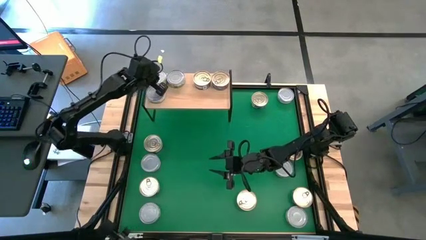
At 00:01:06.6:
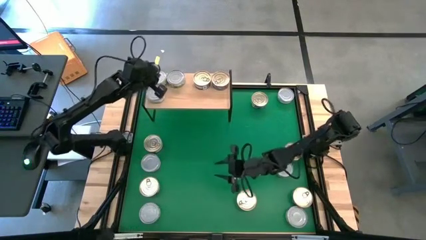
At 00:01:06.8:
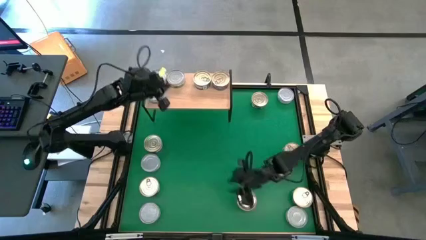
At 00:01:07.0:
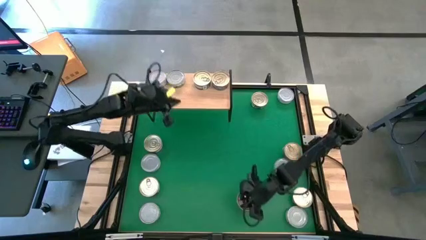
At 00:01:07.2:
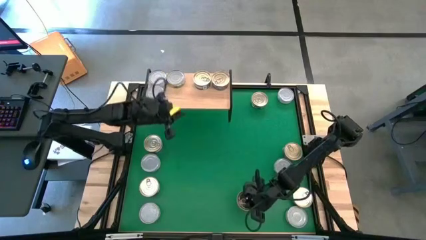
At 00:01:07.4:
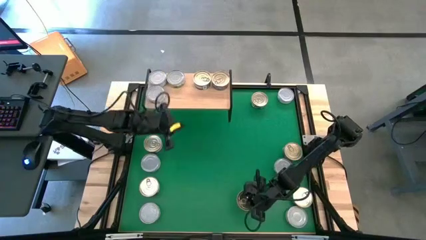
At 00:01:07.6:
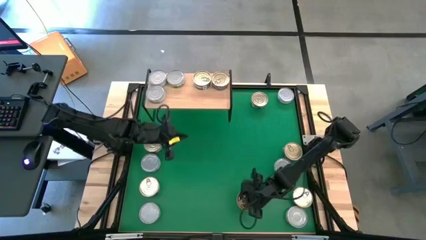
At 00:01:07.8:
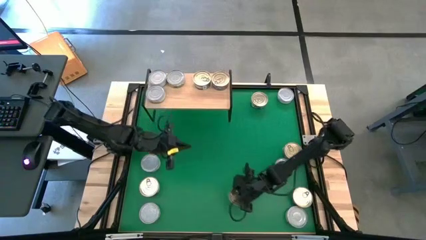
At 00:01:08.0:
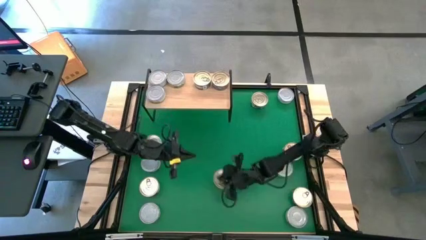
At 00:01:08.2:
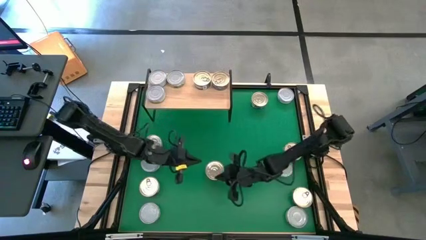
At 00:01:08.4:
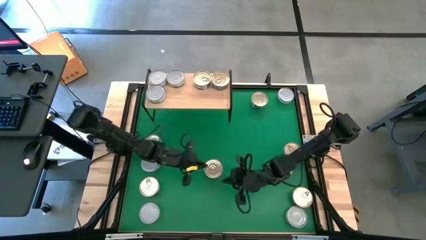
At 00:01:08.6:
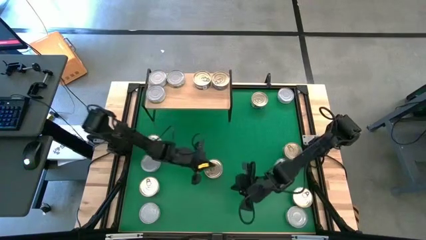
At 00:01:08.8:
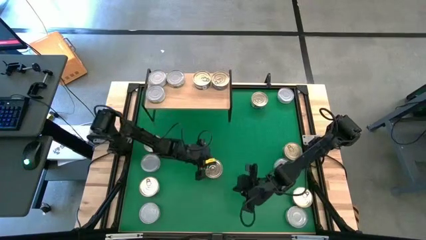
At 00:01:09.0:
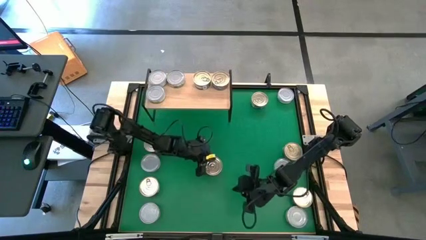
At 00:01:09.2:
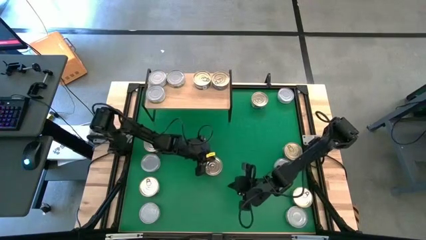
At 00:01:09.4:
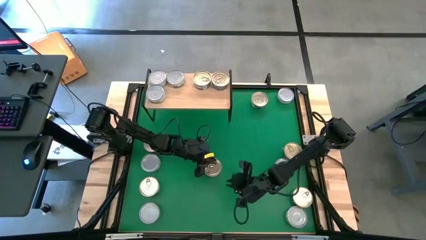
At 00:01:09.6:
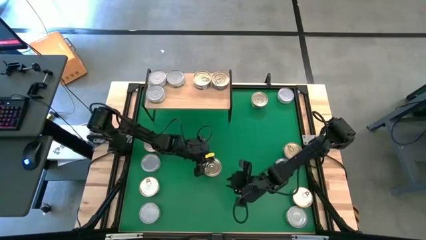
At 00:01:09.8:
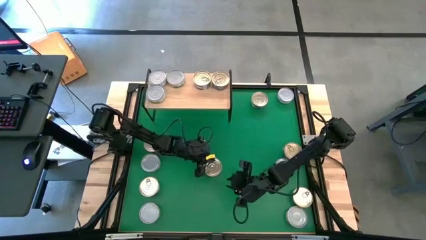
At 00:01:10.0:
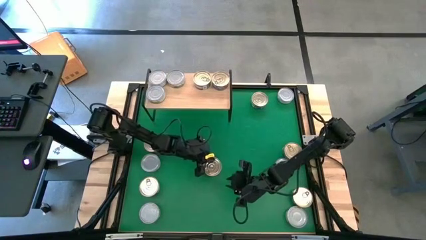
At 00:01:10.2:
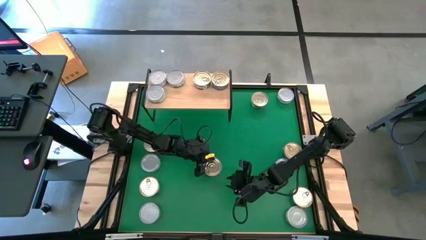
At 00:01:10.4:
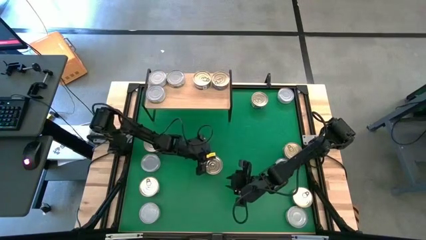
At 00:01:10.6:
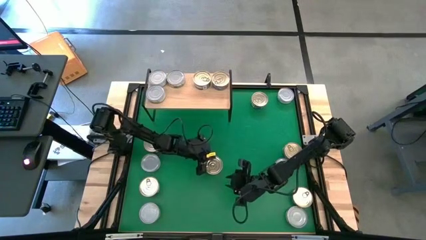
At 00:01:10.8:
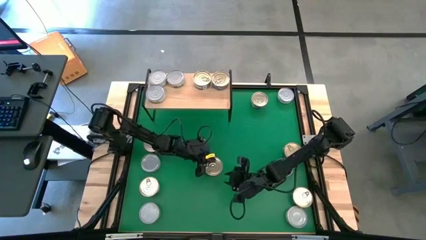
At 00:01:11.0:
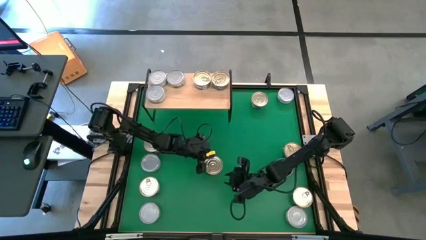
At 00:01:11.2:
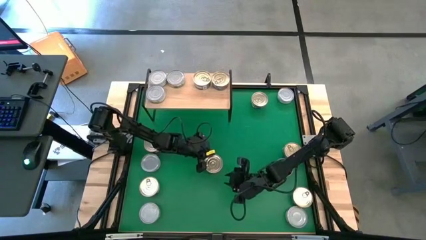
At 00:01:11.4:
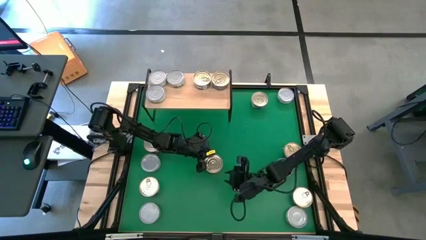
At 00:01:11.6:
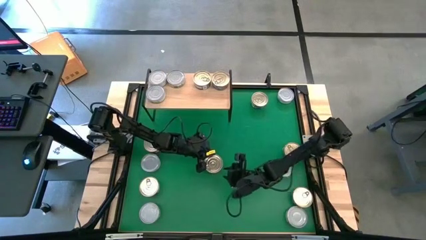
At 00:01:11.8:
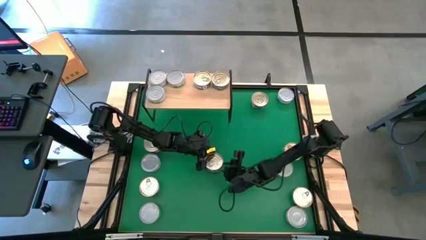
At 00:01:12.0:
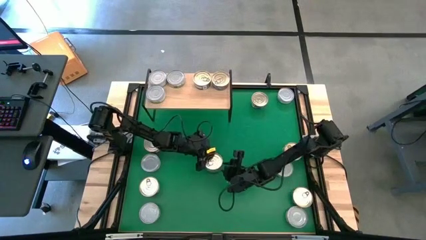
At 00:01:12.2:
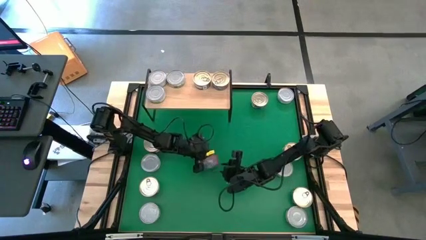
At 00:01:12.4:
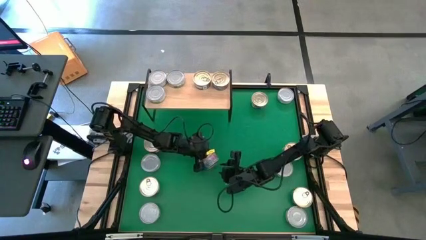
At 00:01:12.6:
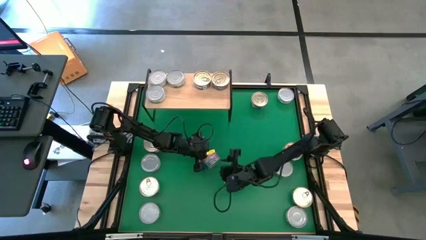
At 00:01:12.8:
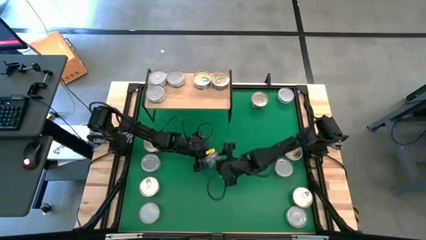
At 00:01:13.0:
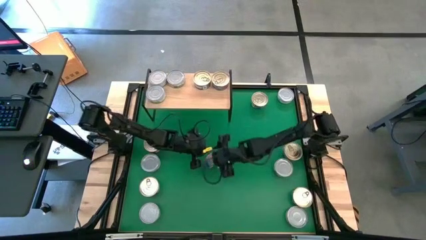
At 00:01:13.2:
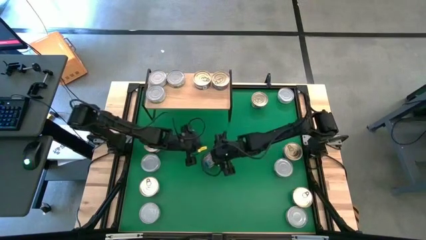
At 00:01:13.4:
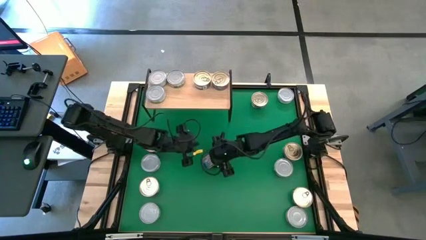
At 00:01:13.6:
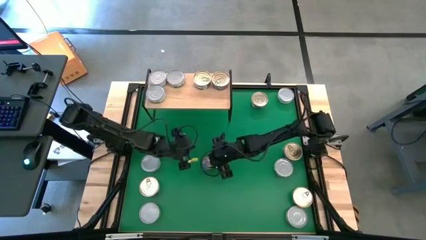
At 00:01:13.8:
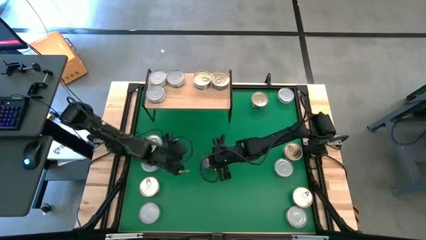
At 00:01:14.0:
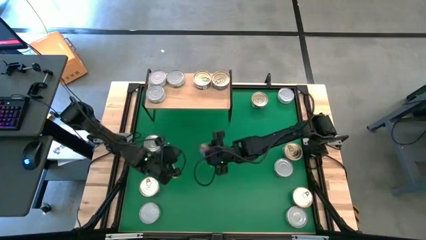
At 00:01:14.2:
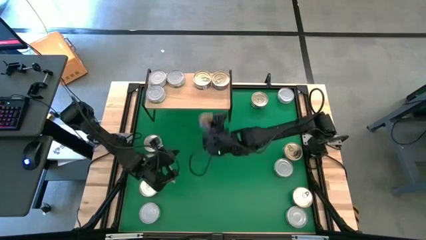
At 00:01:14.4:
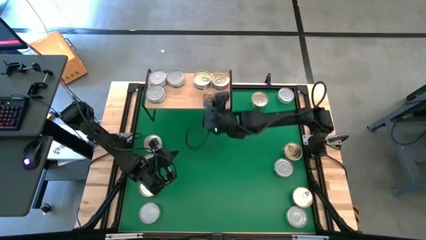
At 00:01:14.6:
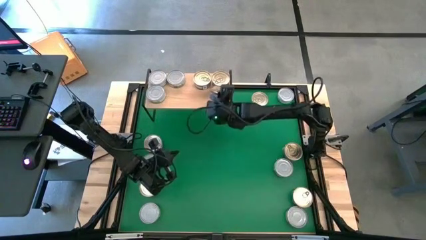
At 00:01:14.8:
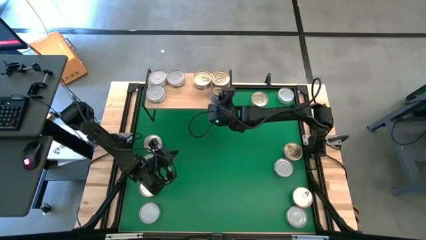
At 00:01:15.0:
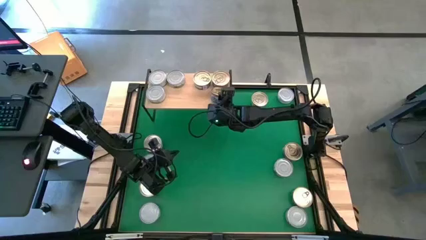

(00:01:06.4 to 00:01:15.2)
Task: Stack canned seafood by type on shelf
Put the blue-pink tuna can on the shelf

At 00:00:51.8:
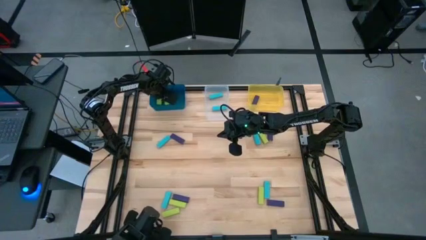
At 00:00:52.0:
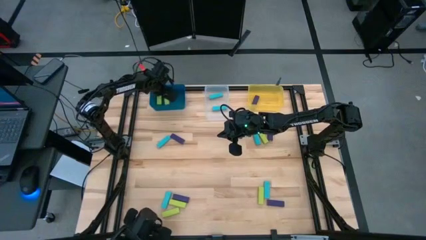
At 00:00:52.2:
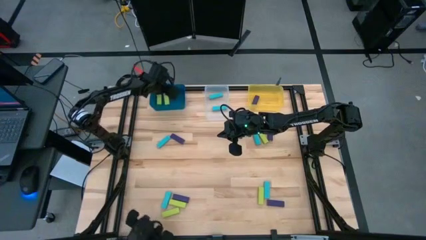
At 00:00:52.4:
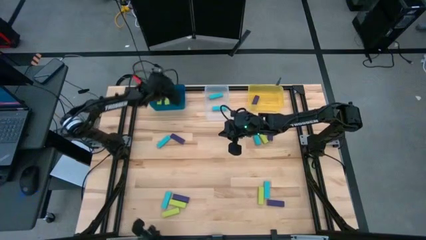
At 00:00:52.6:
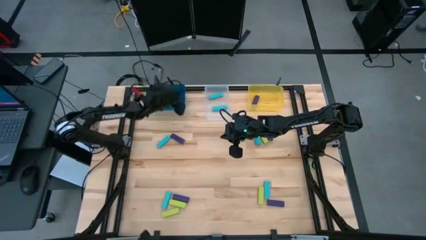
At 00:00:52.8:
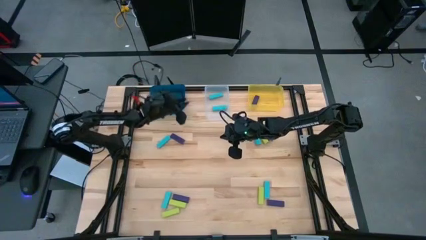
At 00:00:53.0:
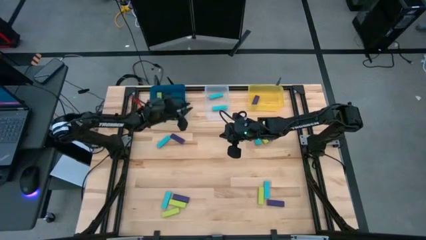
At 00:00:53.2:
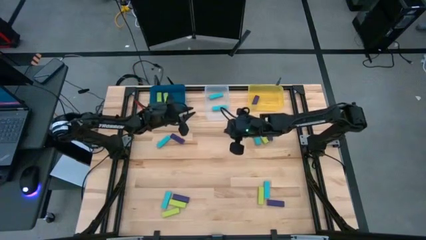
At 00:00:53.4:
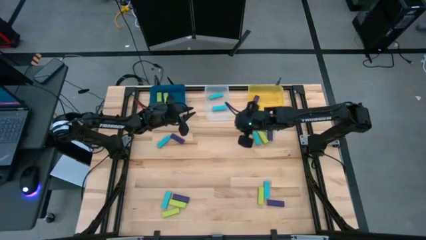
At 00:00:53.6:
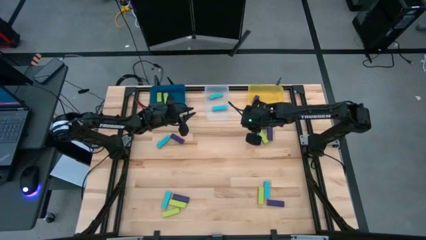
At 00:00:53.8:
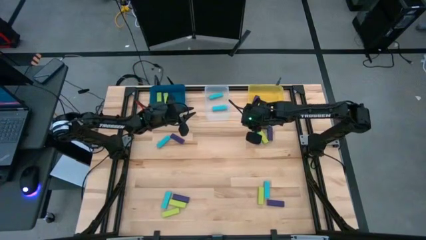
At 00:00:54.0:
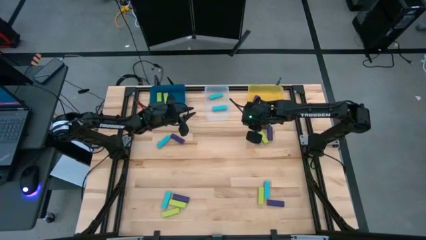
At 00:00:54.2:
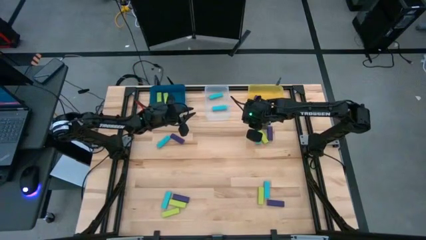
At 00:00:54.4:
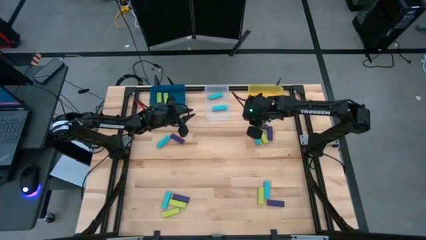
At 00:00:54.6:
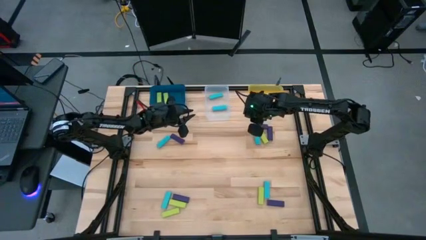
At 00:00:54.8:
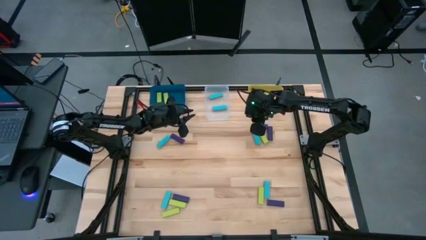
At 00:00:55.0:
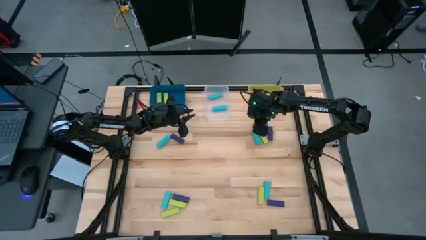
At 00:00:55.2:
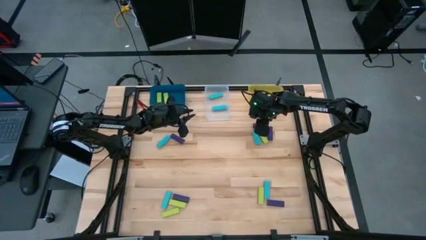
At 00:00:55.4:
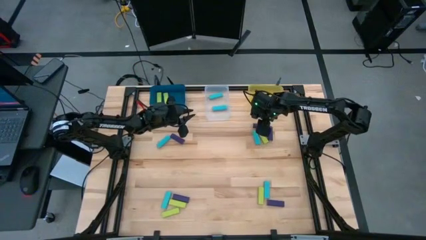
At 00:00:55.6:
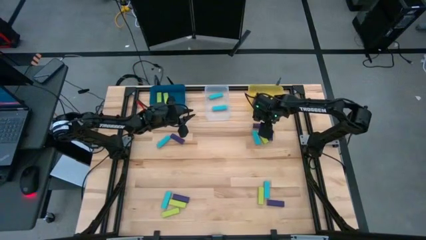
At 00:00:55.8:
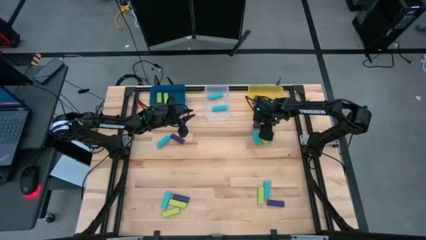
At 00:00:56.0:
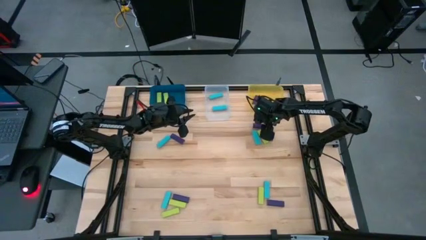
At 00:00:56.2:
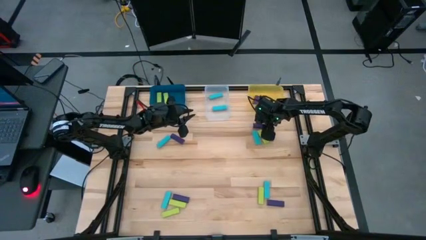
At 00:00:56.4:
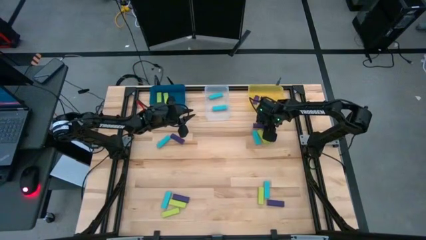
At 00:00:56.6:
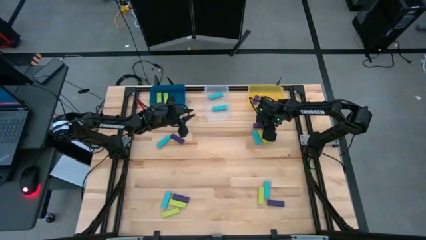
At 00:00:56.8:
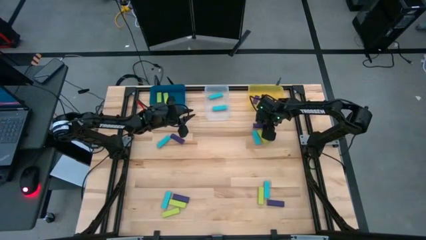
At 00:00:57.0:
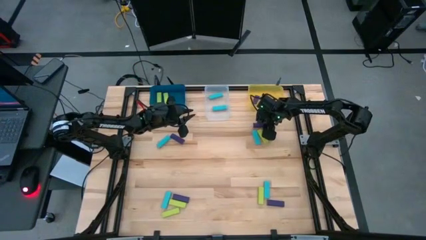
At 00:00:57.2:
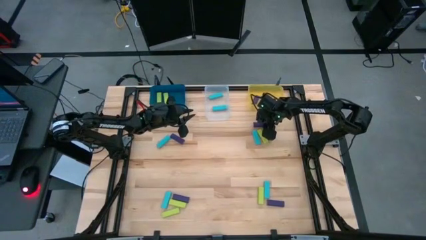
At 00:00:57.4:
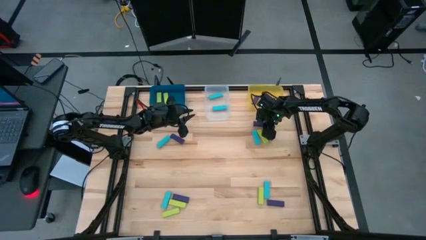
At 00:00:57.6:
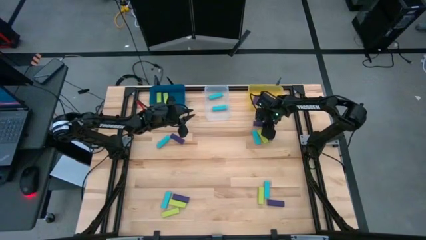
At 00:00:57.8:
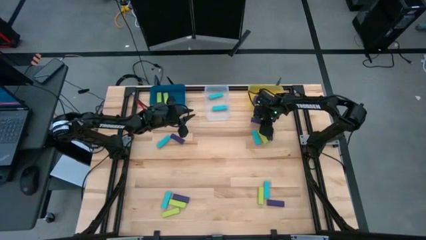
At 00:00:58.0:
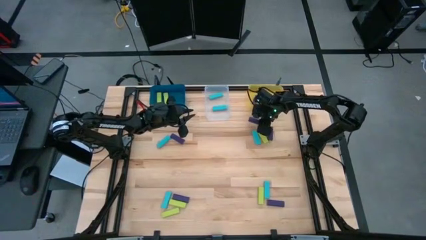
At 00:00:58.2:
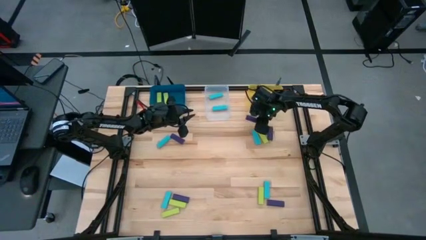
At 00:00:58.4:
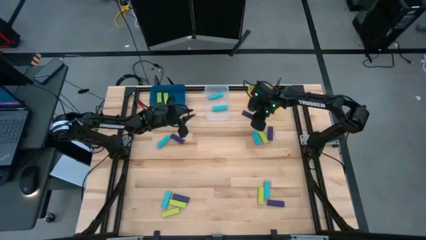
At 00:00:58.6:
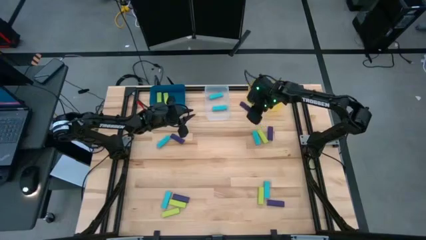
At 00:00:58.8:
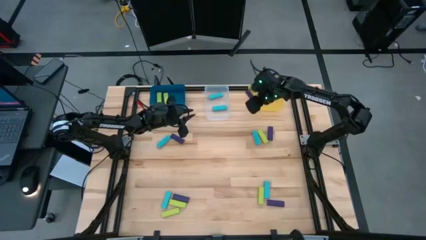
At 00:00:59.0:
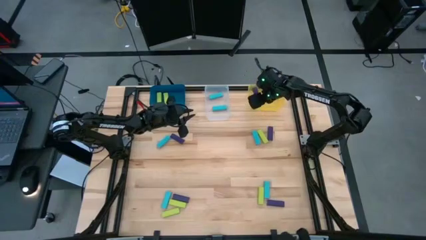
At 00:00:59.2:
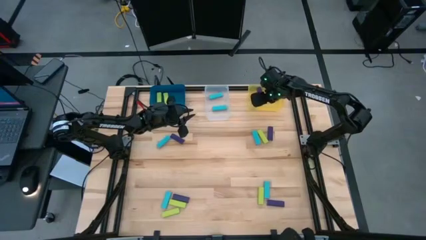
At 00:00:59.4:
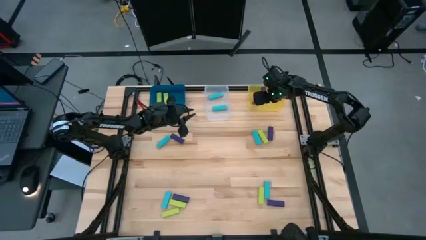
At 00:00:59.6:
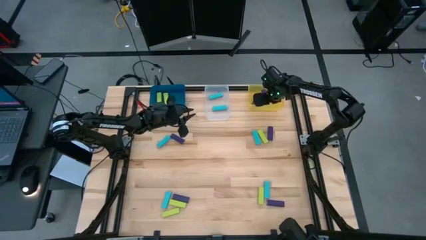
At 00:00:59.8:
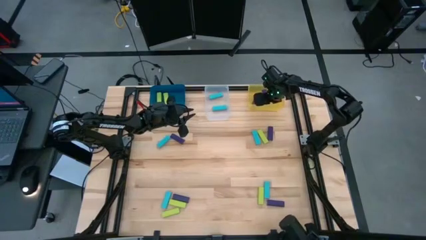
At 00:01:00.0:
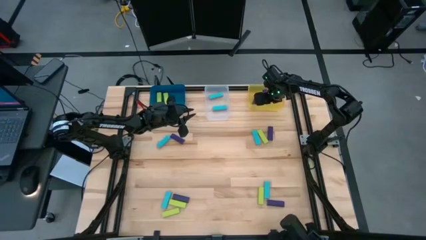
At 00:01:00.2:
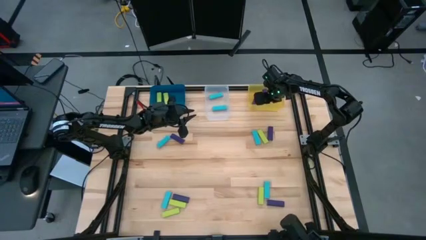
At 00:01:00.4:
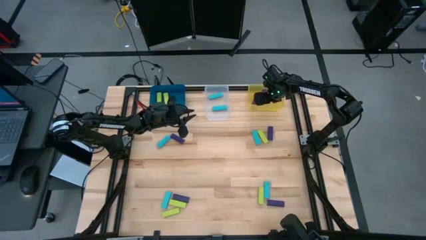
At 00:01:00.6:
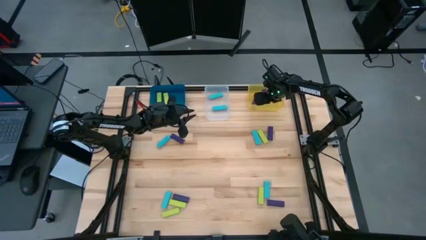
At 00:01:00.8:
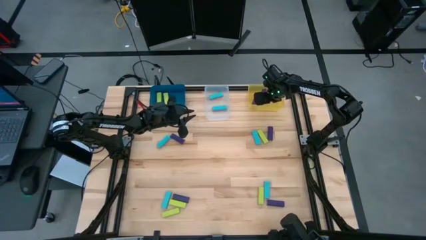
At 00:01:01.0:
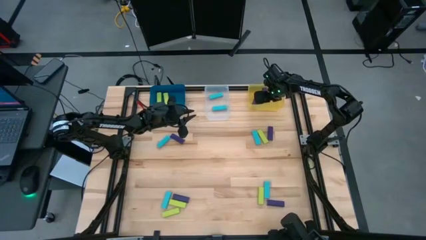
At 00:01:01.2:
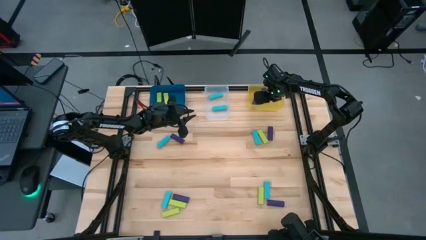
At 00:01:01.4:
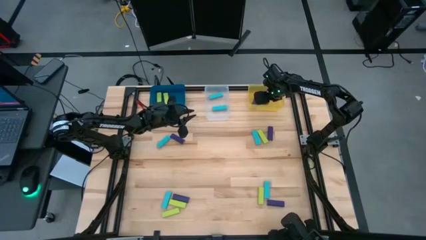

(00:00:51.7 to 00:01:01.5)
Task: Sort blocks
Put the violet block into the yellow bin
